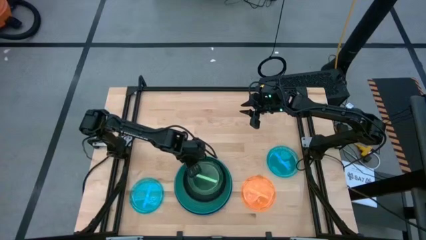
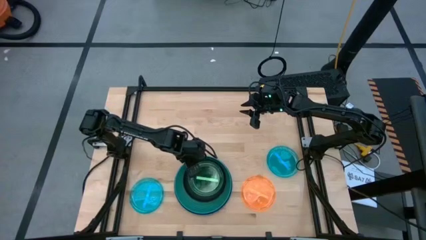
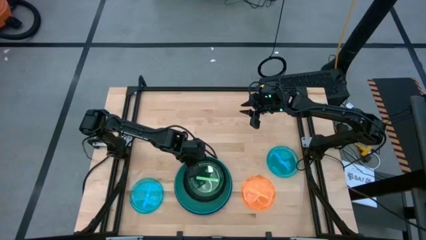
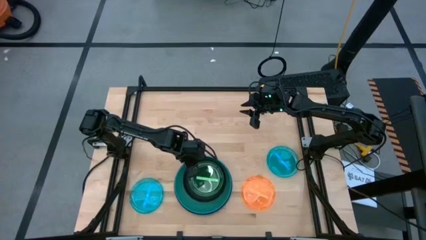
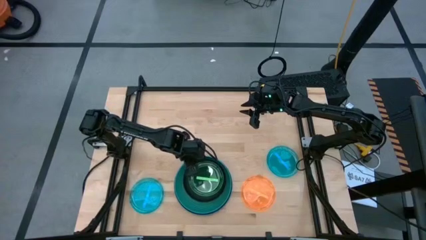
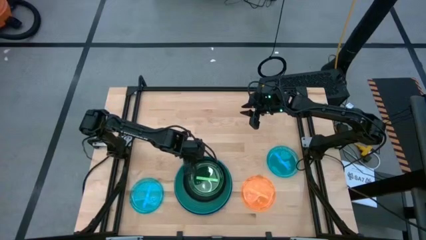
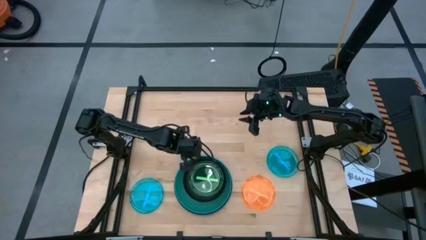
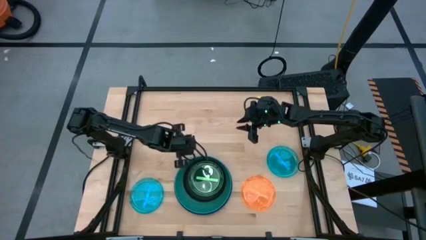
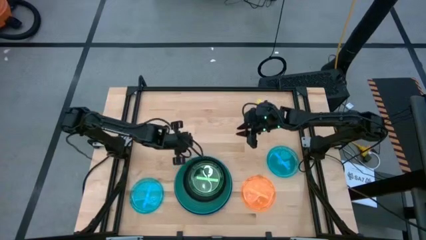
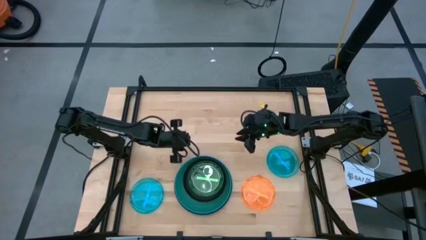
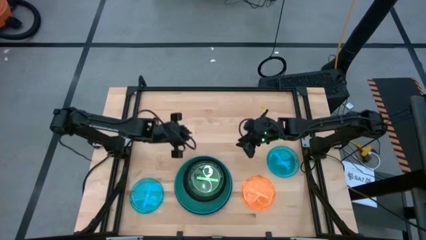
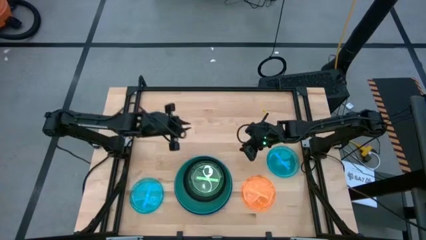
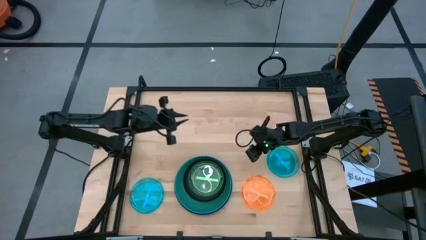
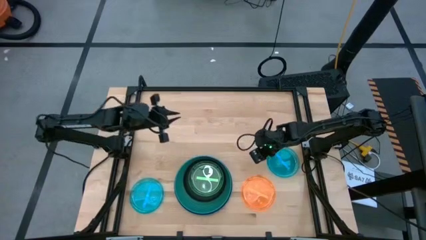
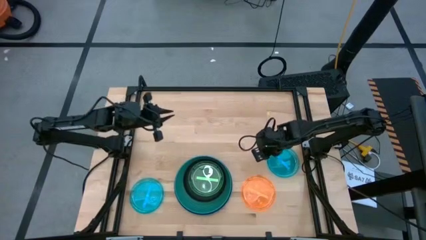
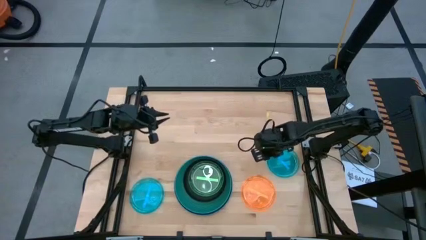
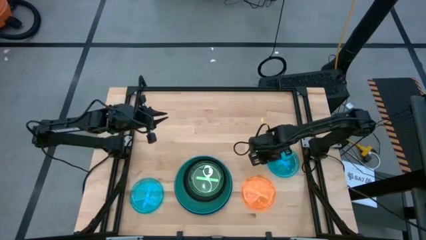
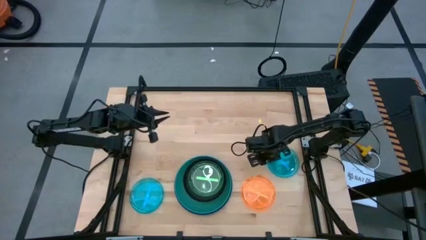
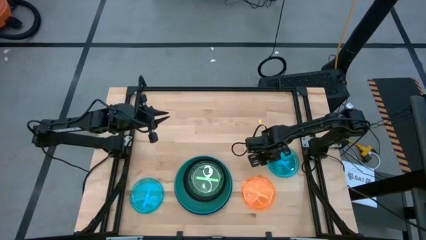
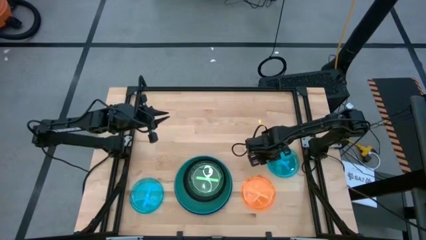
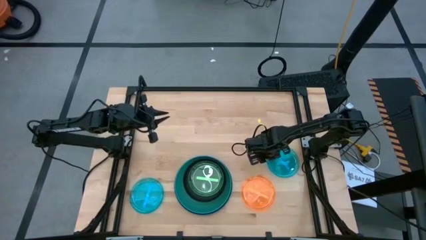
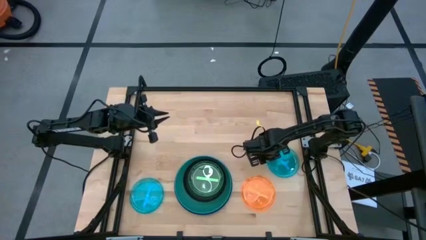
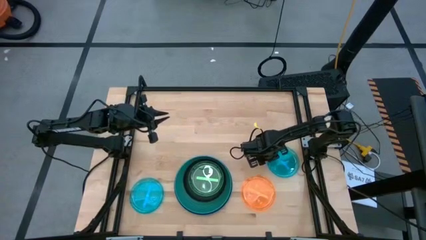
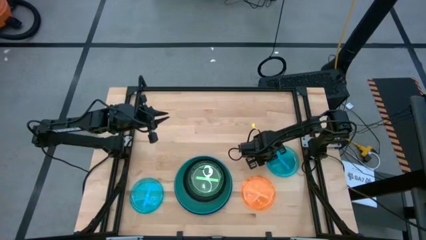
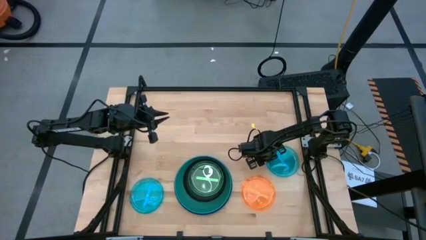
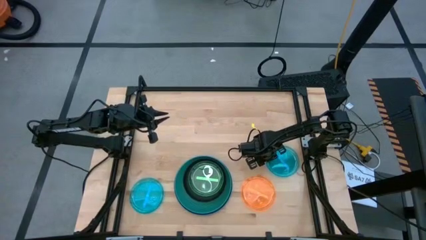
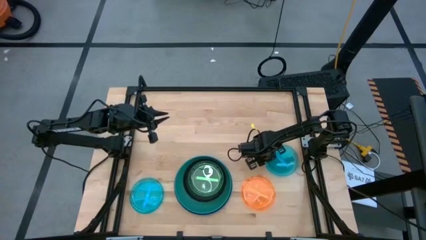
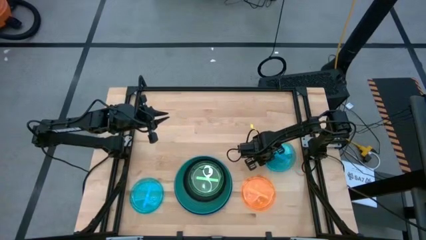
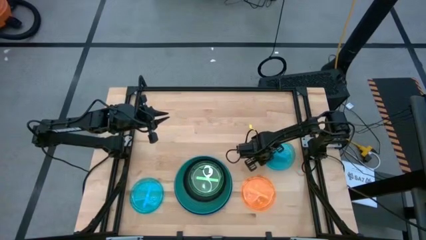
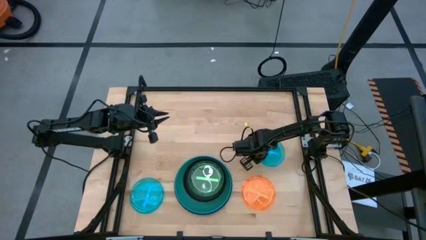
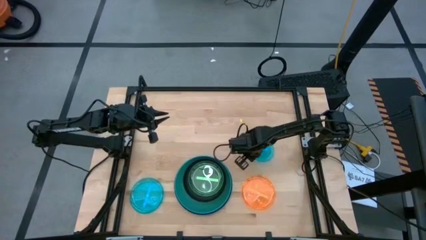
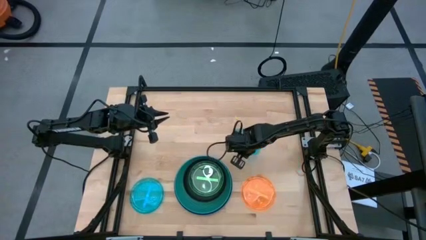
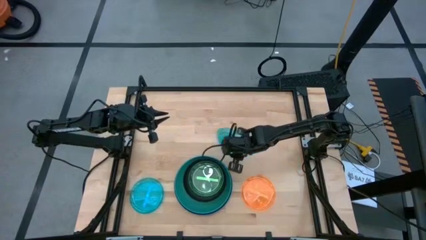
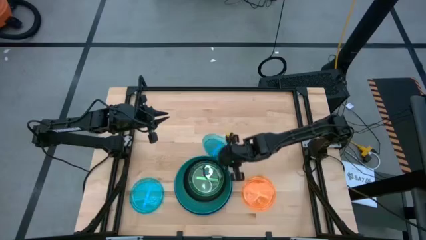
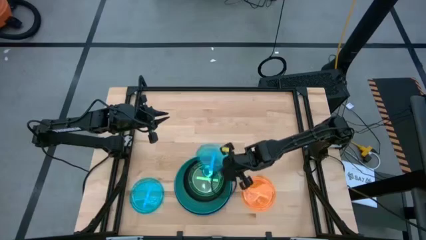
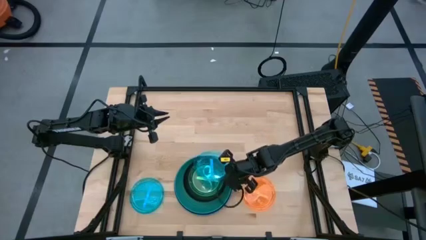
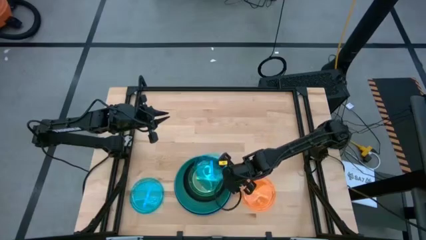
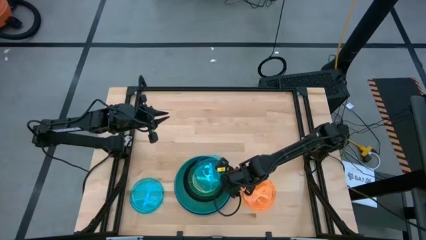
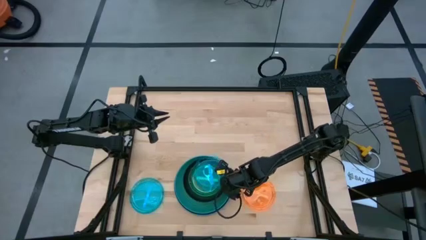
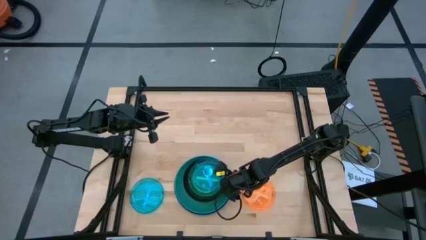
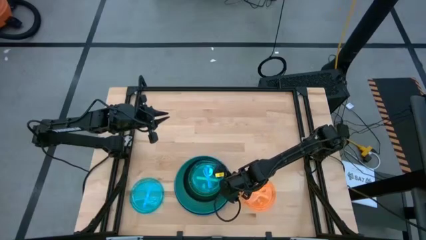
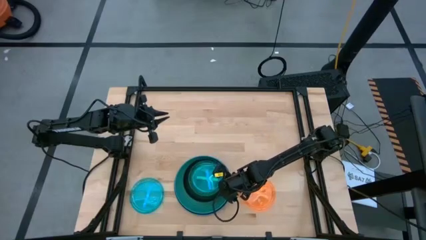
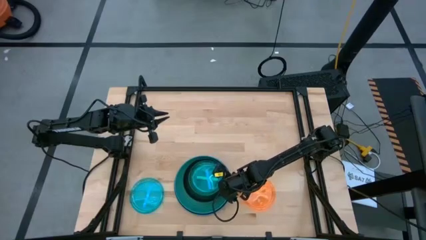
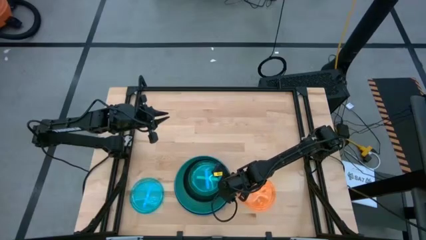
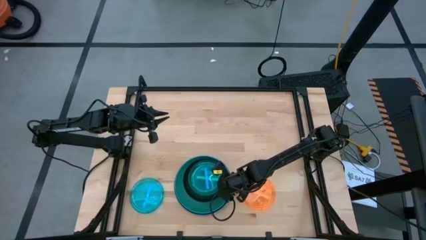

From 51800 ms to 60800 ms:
Task: Stack plastic plates
Stack the right light blue plate on top of the light green plate
